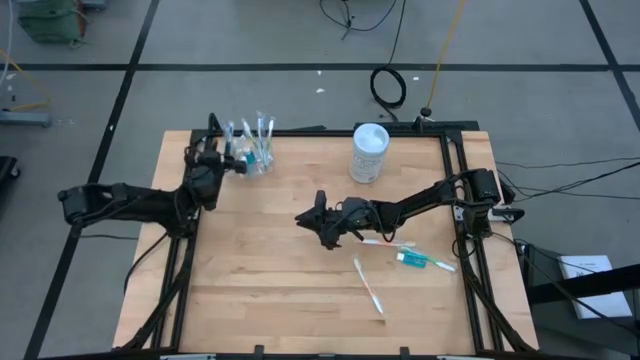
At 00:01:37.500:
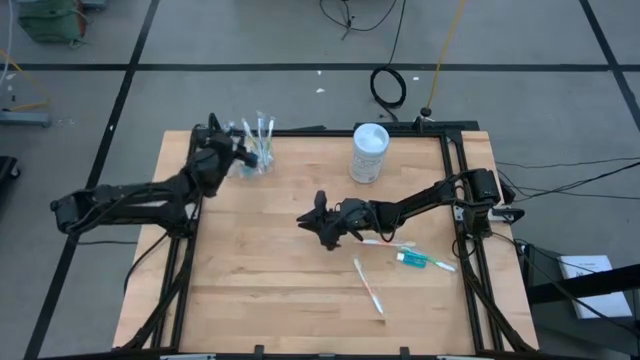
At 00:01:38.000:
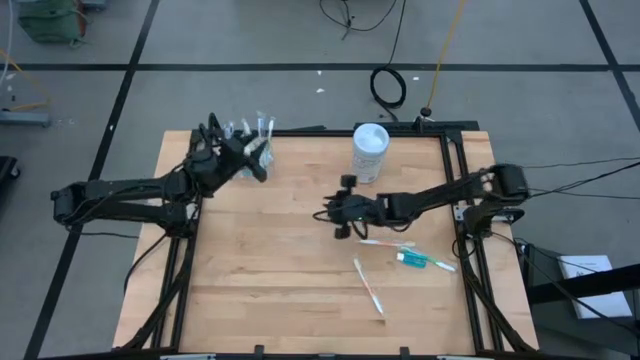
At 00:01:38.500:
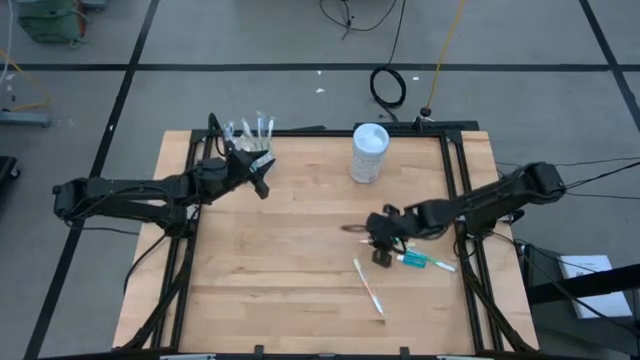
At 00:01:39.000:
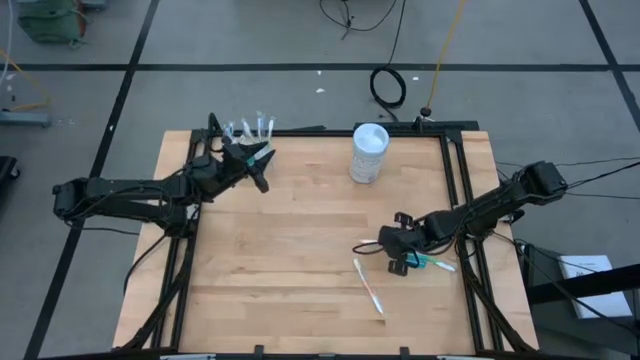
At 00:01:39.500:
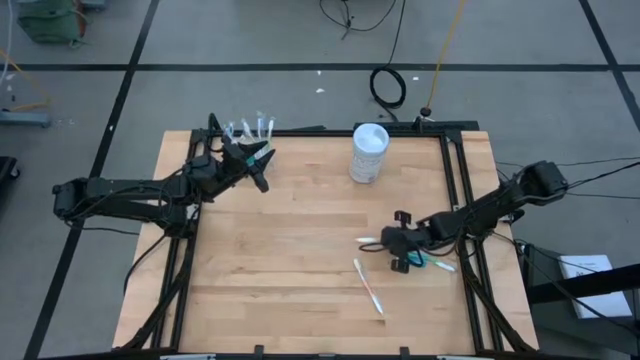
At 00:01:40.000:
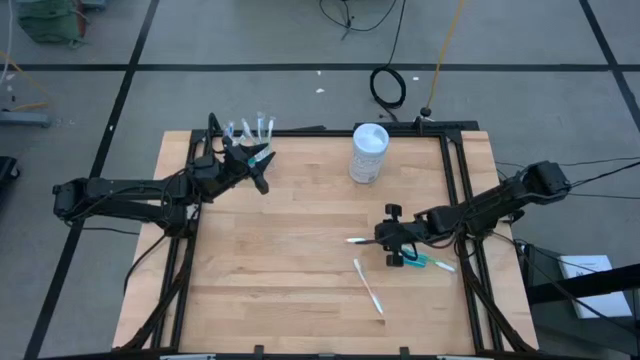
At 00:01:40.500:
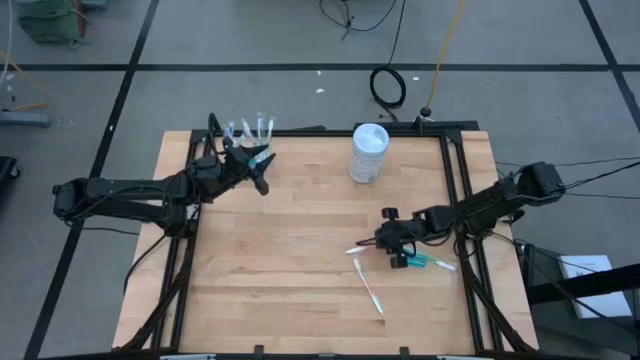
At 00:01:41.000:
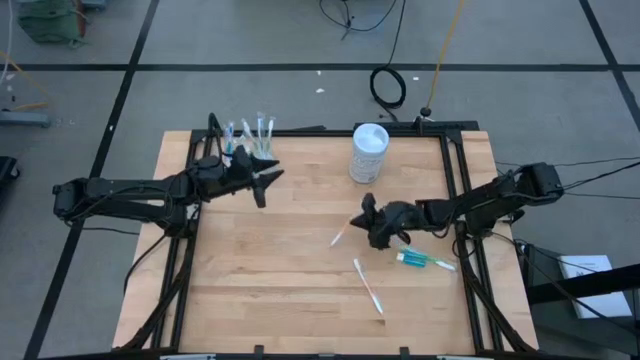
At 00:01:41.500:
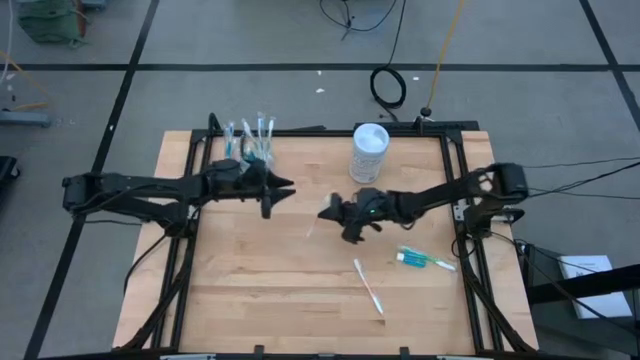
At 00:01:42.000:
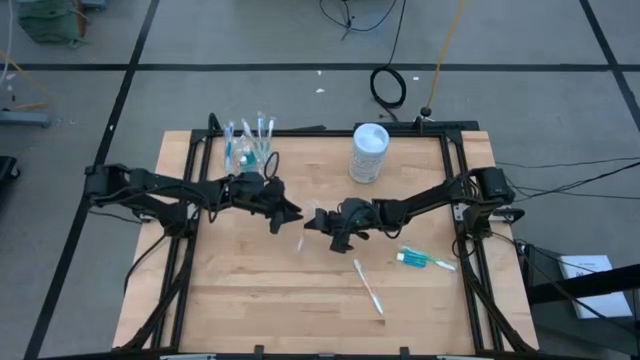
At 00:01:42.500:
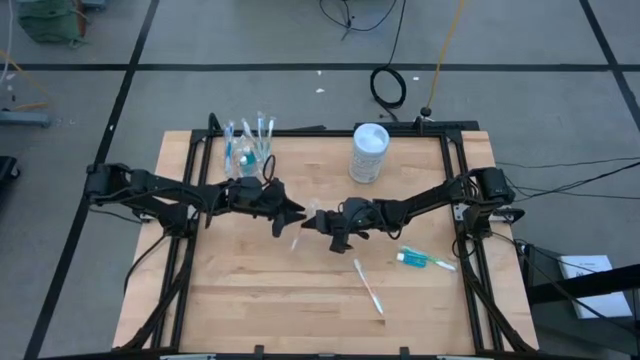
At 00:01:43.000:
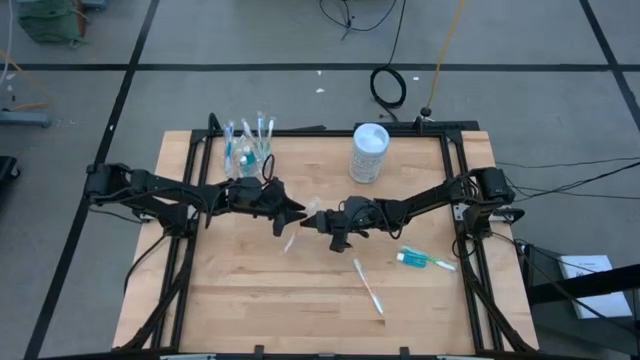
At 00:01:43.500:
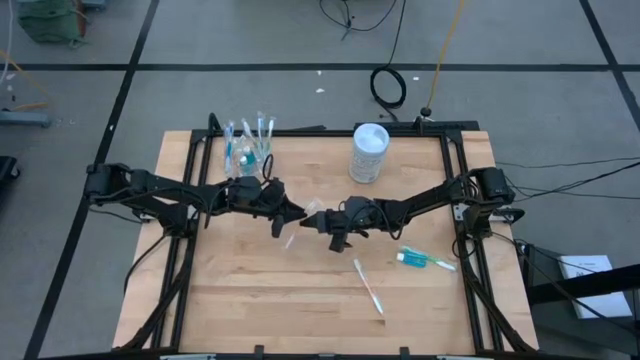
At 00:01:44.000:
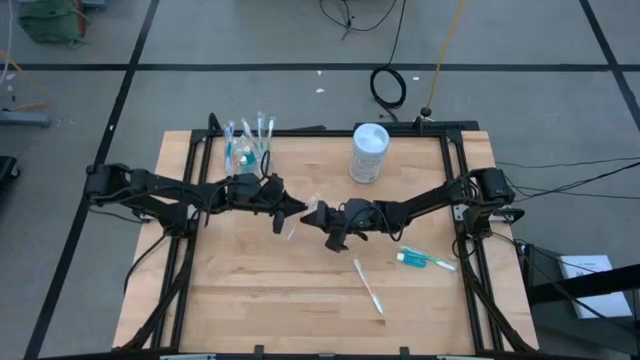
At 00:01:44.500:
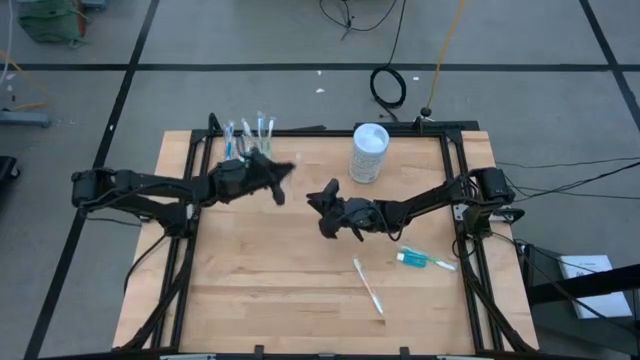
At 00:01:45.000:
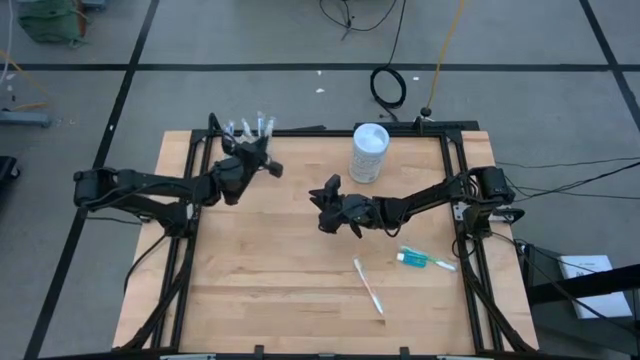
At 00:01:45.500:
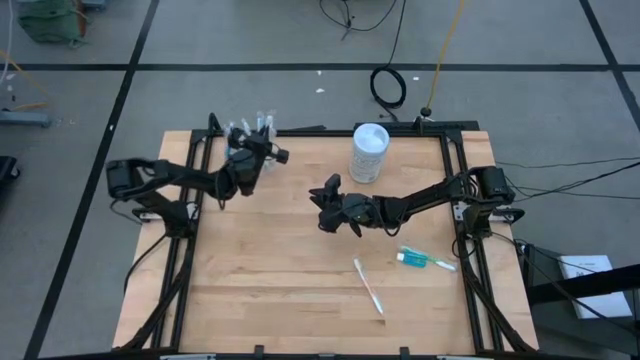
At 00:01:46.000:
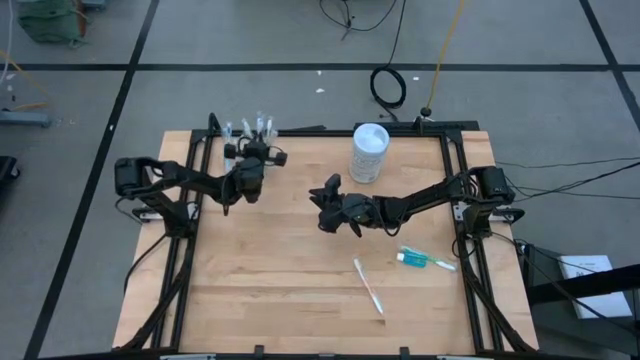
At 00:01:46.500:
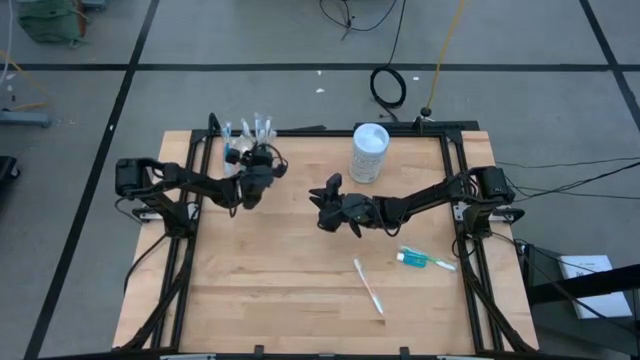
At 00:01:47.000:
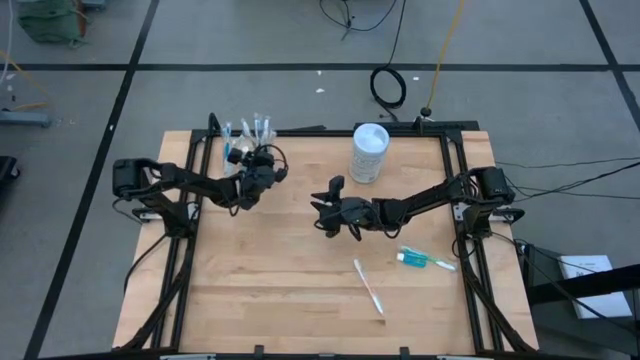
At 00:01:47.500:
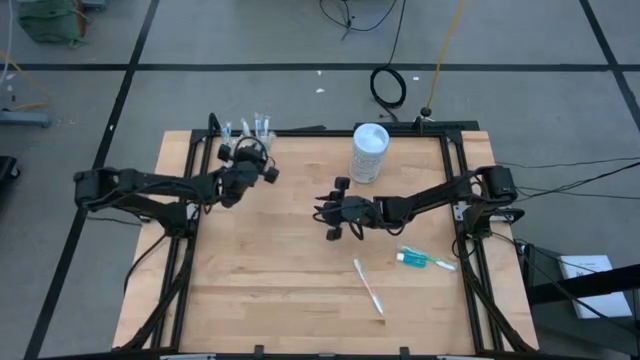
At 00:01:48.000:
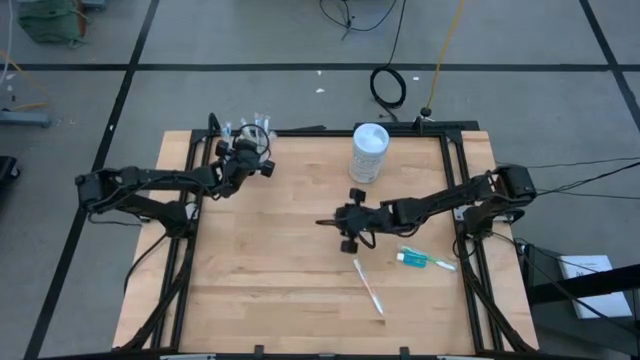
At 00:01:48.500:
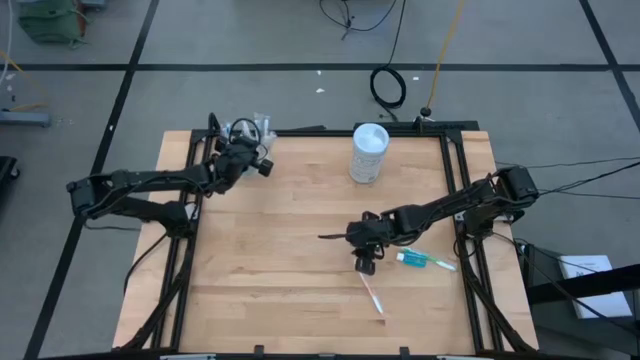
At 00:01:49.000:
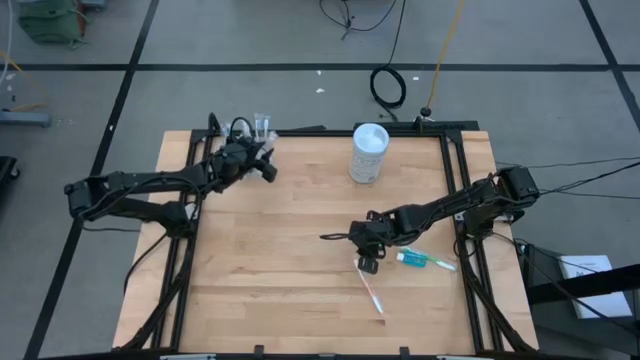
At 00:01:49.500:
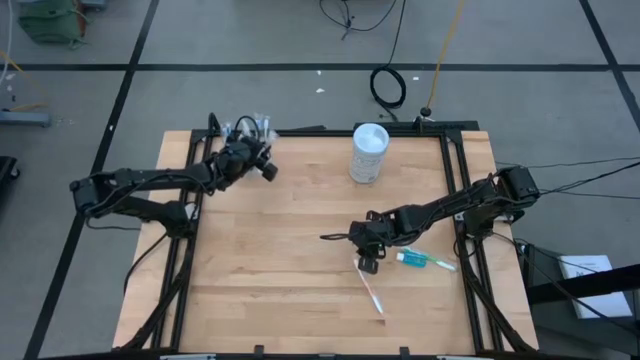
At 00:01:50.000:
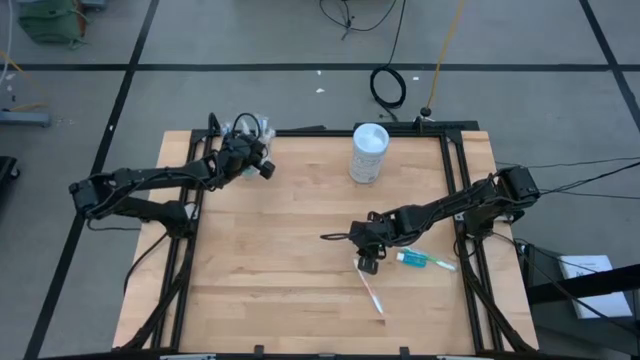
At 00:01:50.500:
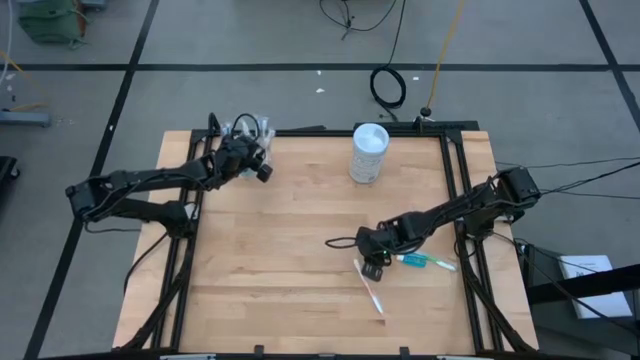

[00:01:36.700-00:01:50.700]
Task: Pick & Place toothbrushing station
Put the orange toothbrush into the transparent organizer

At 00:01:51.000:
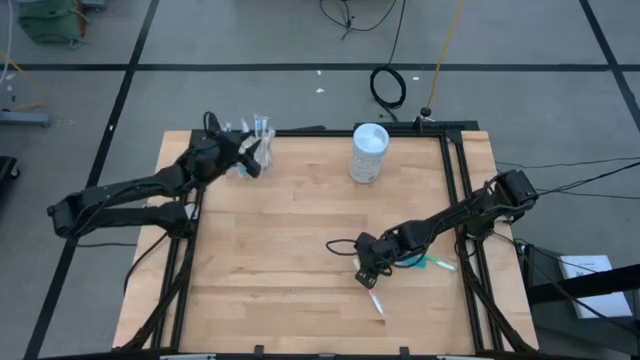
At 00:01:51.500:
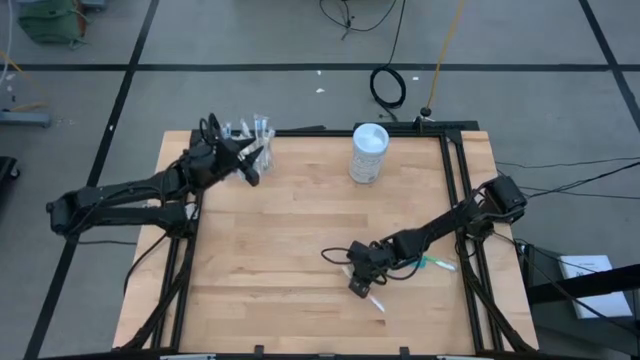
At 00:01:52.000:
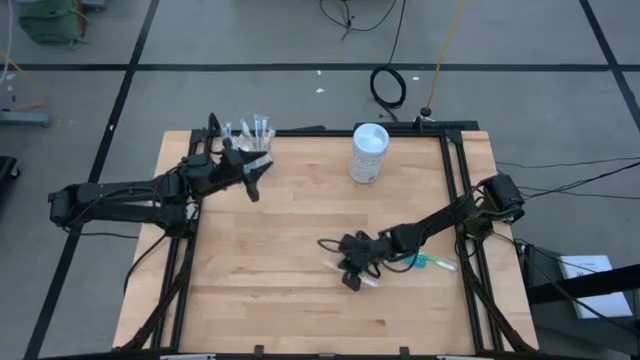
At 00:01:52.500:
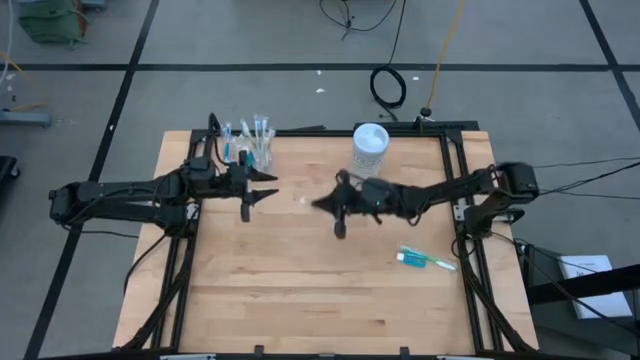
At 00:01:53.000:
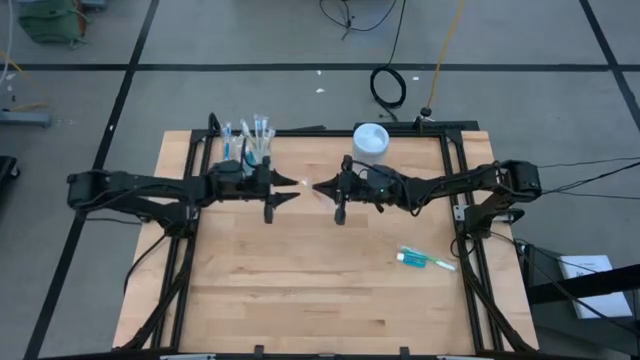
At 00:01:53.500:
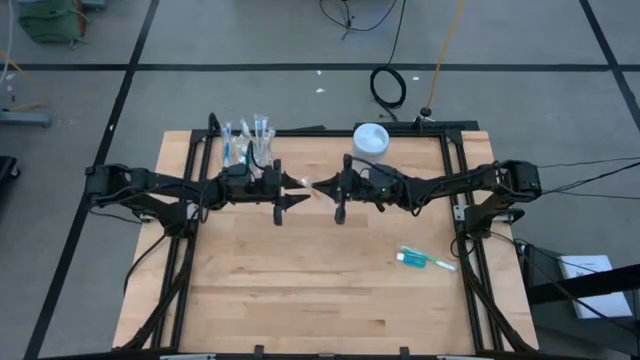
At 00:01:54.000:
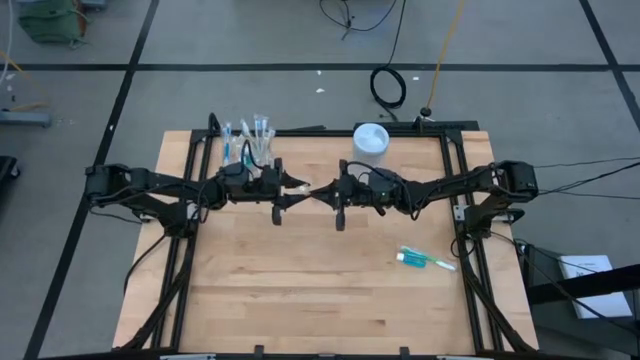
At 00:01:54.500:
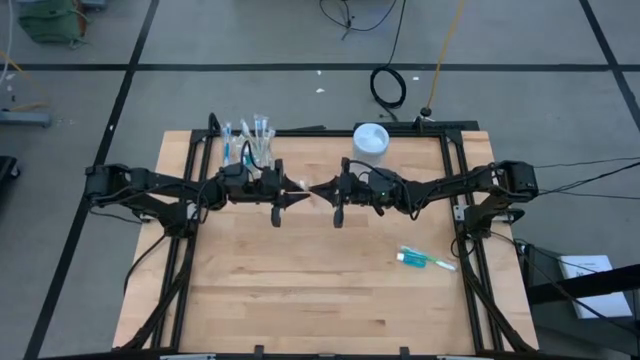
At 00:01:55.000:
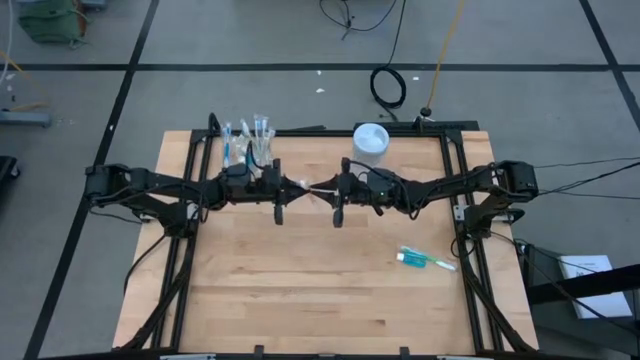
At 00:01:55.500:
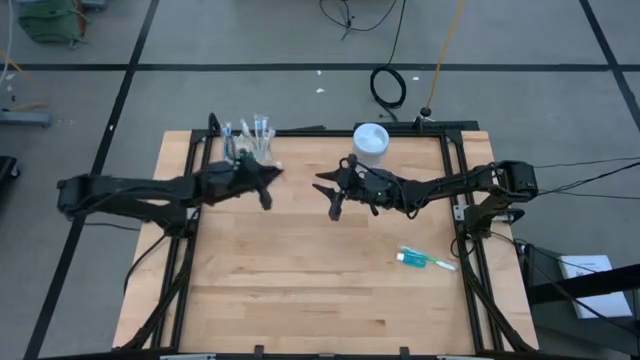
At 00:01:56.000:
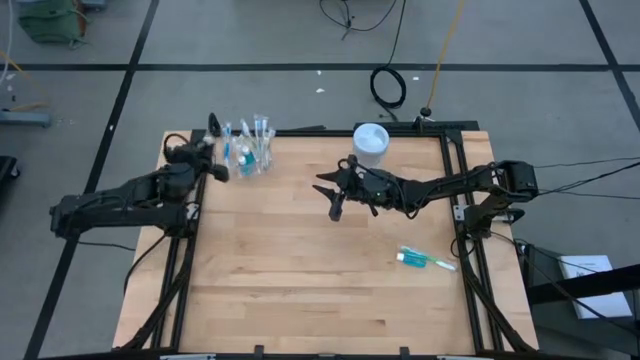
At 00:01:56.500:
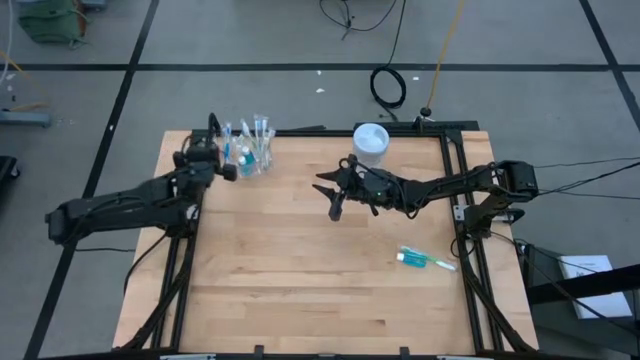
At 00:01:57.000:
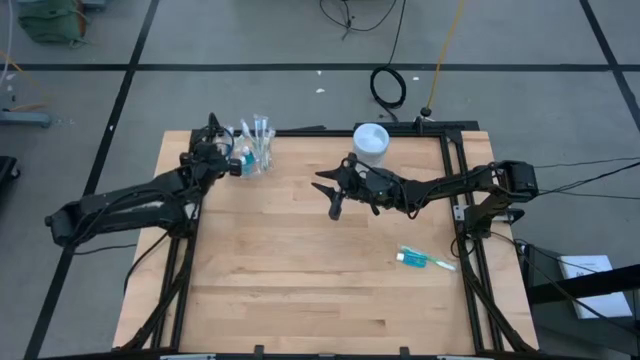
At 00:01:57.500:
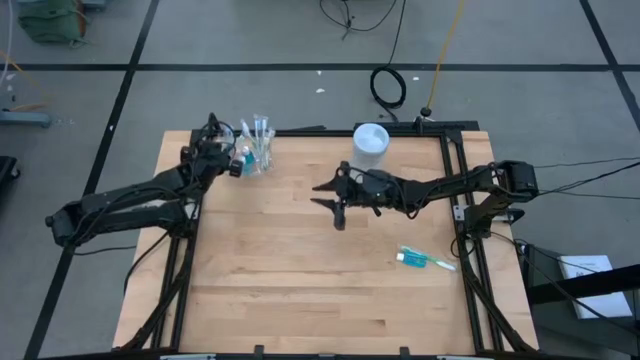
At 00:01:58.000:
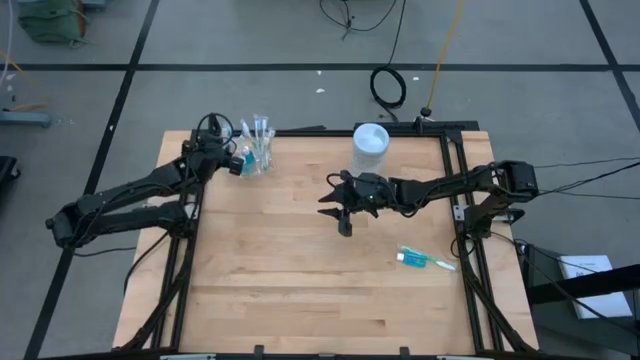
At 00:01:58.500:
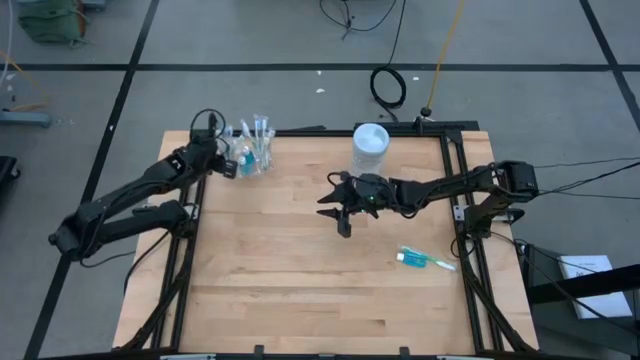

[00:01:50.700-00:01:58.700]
Put the orange toothbrush into the transparent organizer
